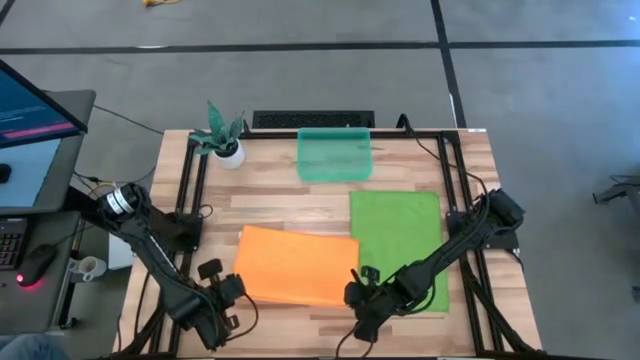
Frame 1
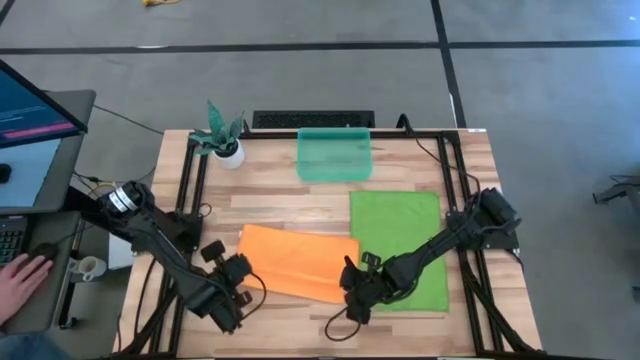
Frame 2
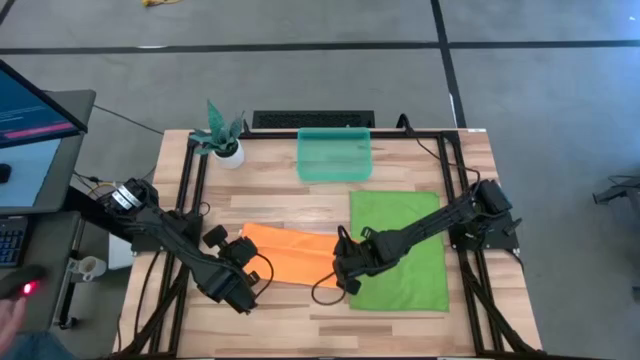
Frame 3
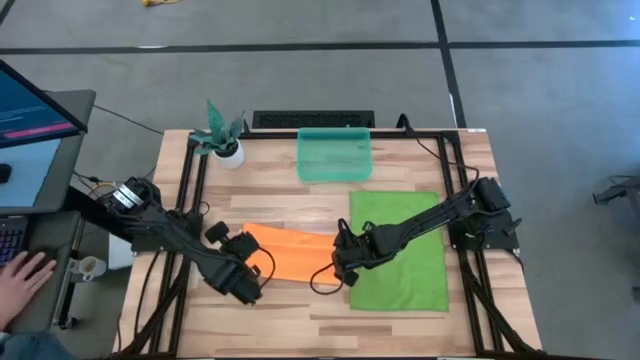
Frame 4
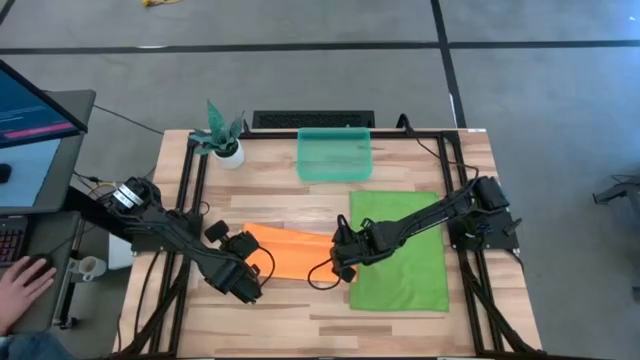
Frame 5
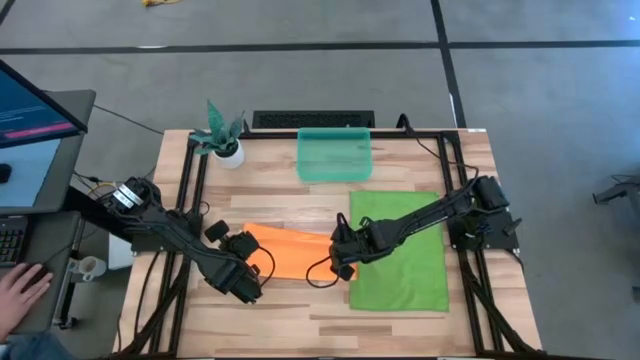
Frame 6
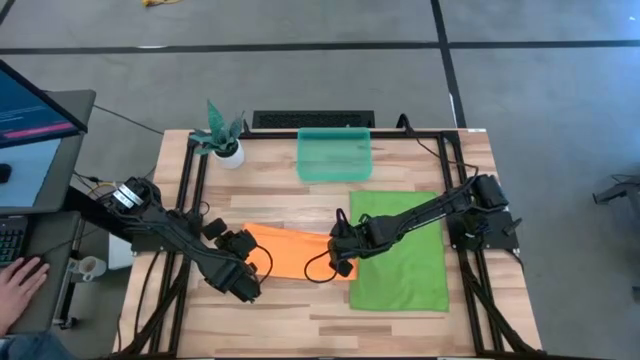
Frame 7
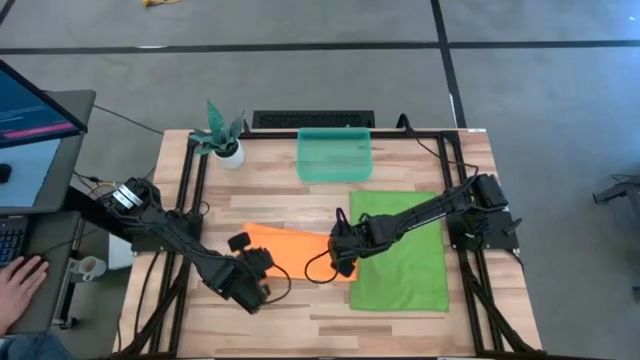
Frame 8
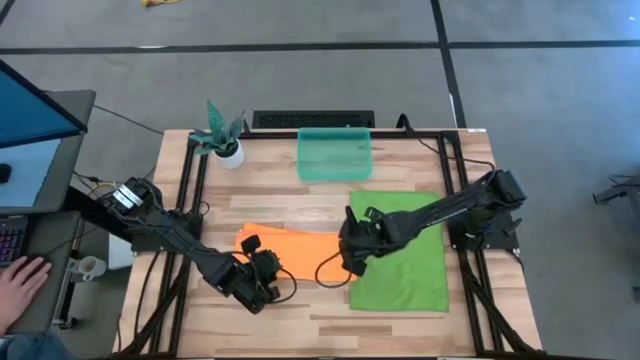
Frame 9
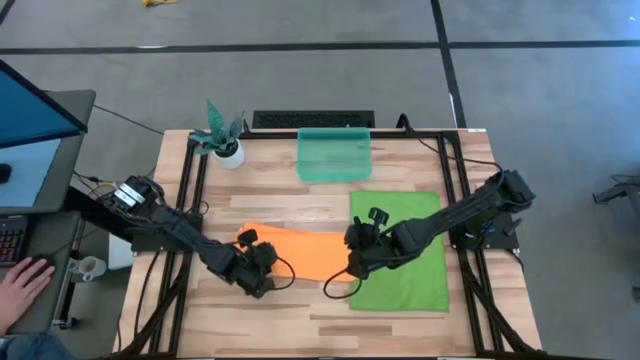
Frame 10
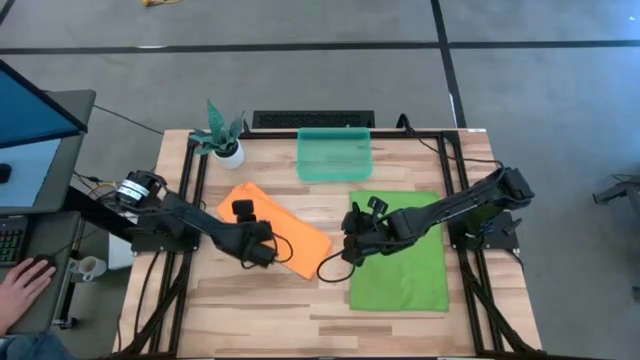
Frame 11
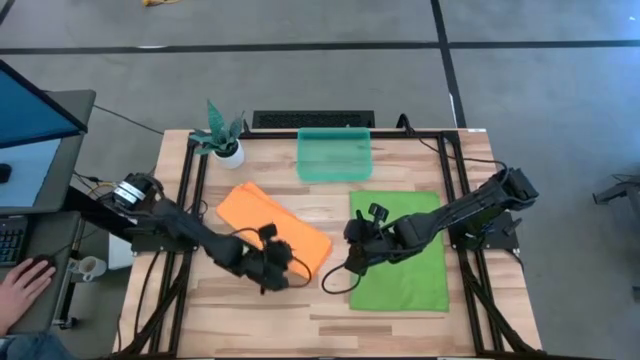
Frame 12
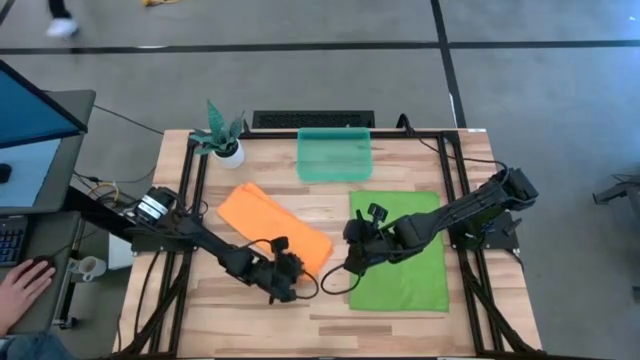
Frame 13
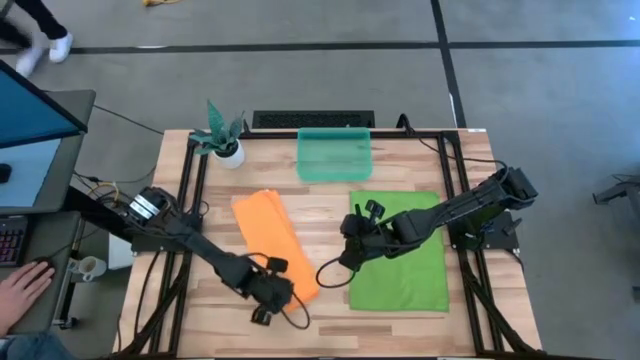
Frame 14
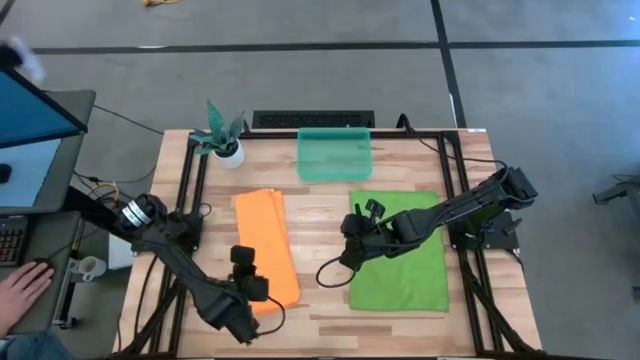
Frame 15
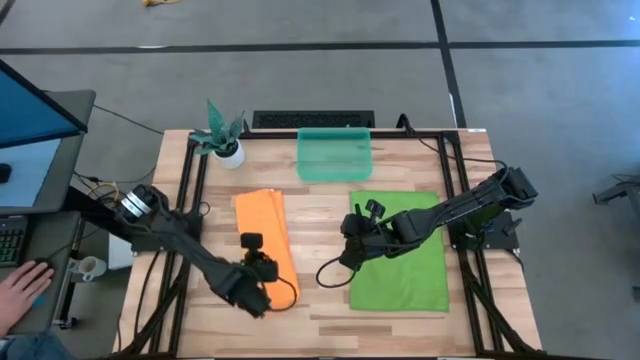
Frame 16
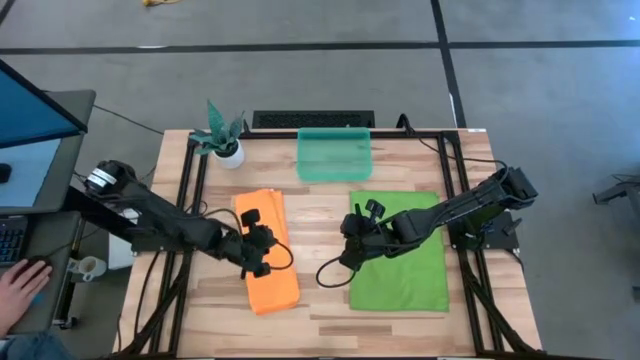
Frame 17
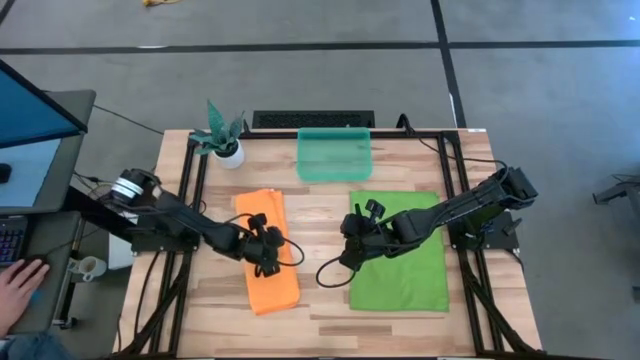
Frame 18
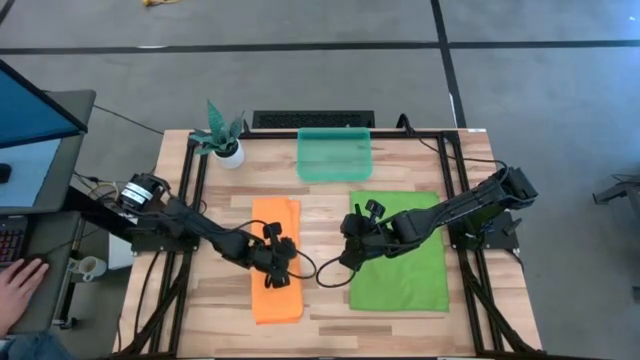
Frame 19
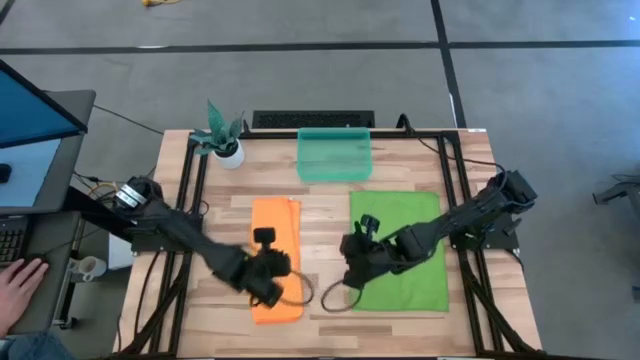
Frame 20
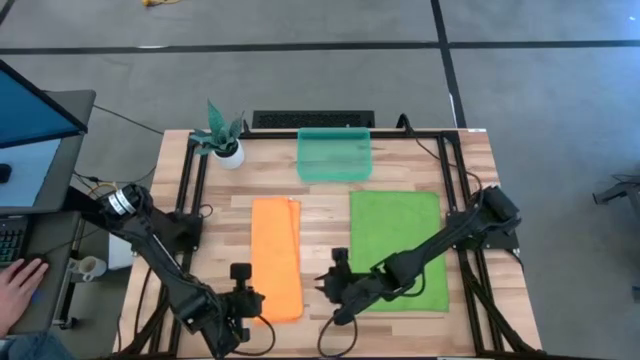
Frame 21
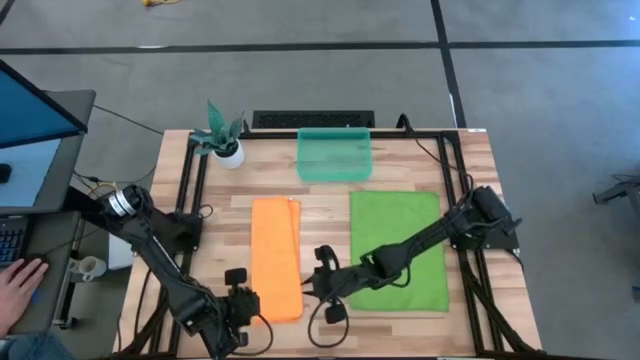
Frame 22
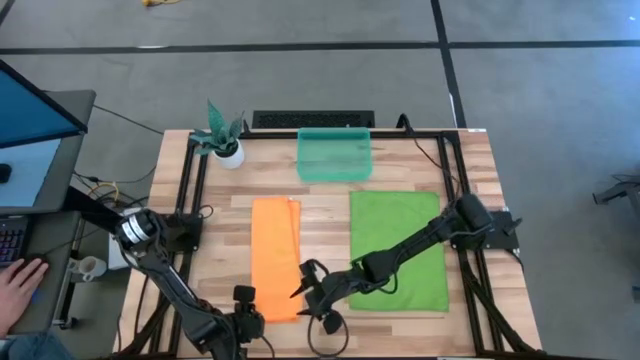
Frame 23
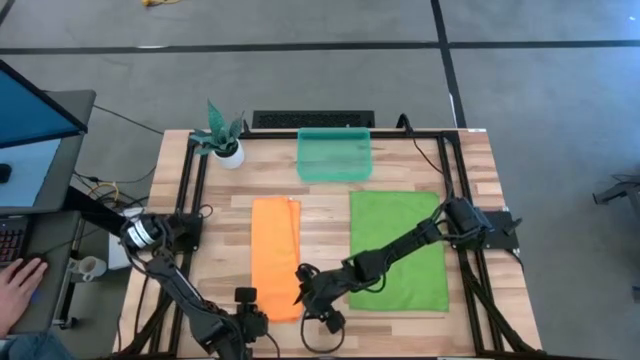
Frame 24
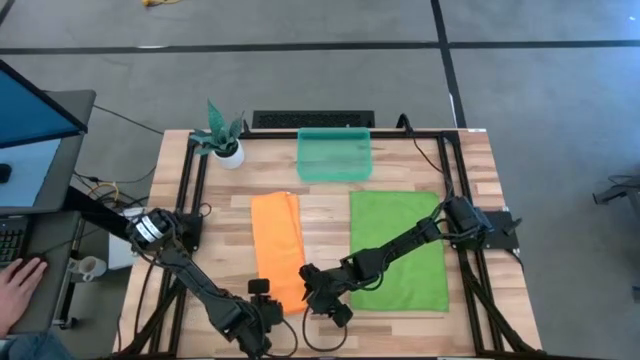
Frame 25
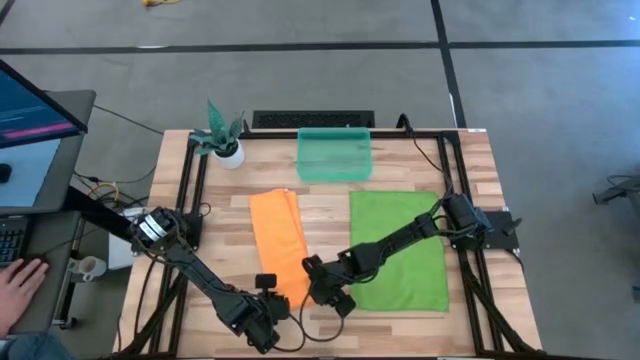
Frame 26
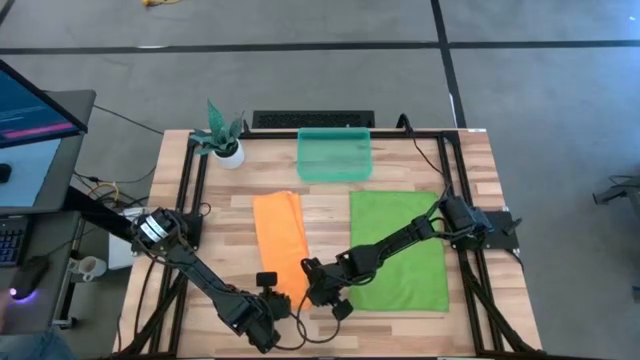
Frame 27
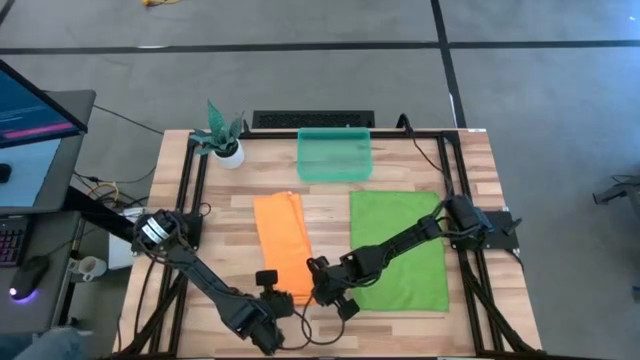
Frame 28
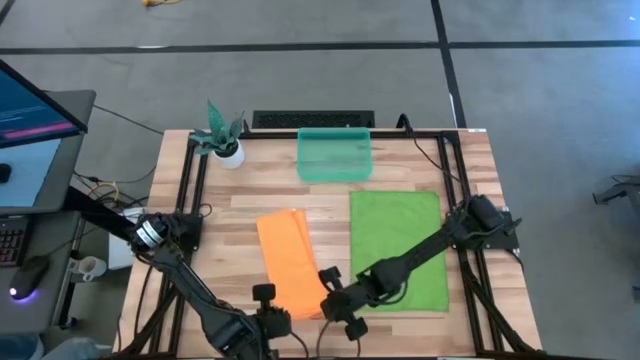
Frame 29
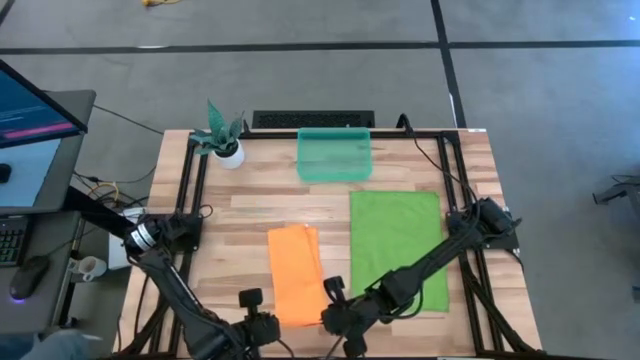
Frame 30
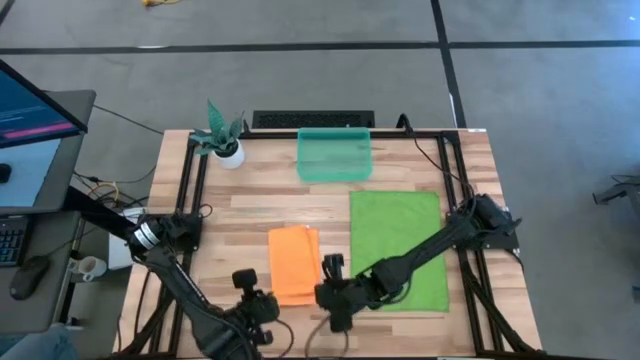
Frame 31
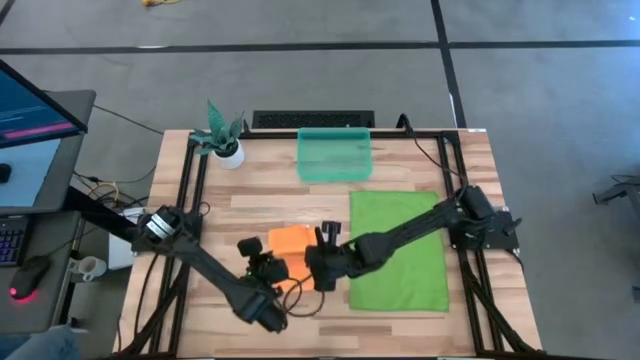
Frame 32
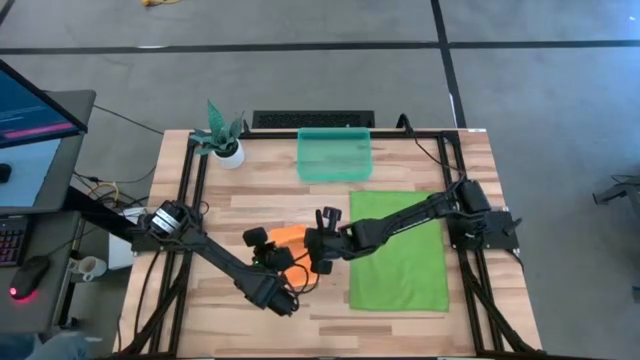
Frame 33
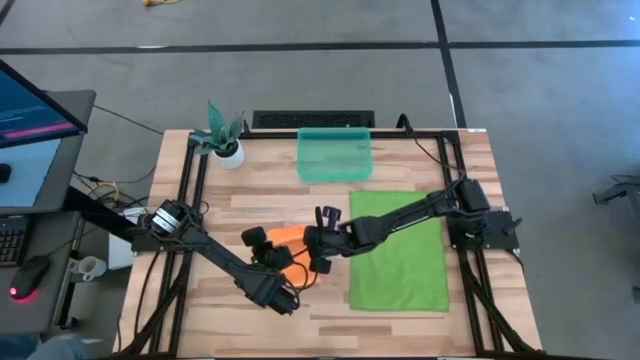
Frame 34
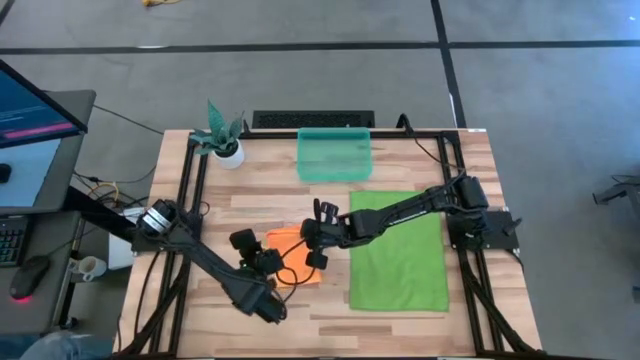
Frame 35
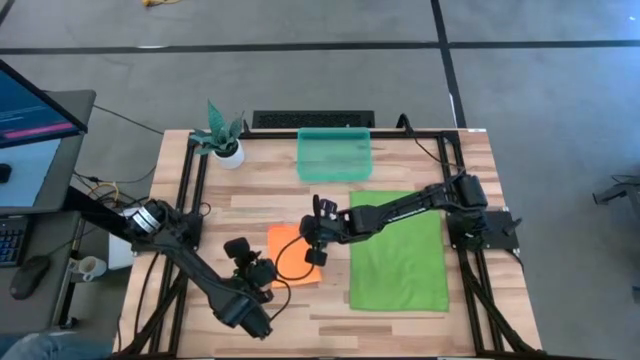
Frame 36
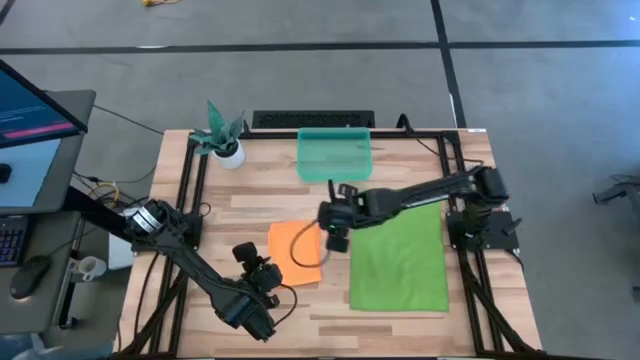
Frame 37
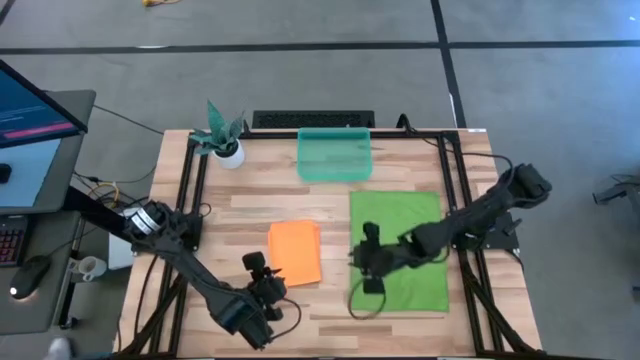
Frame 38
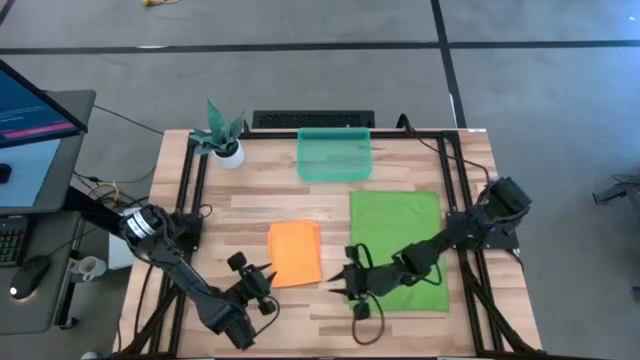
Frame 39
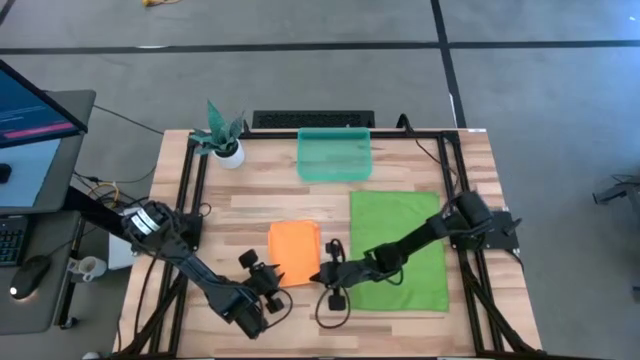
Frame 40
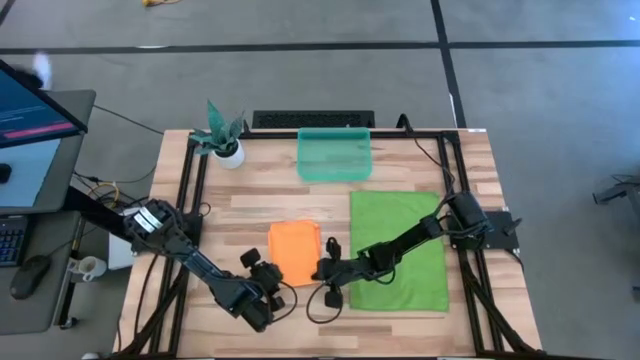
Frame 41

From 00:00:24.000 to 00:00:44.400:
Task: Roll microfiber towels into tight, uniform cylinder then place into a basket
Fold the orange towel
